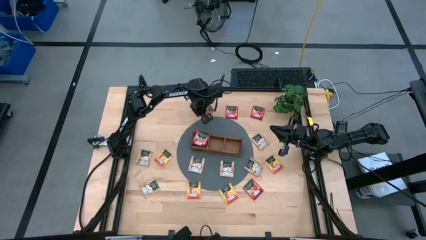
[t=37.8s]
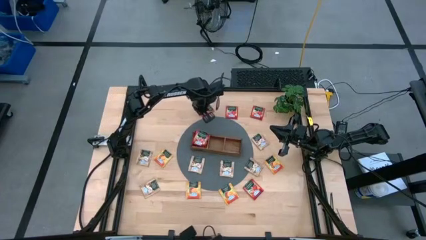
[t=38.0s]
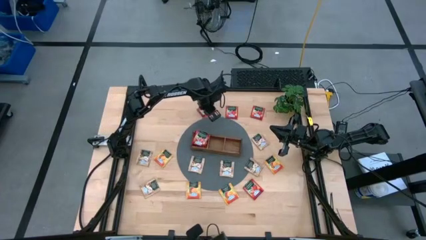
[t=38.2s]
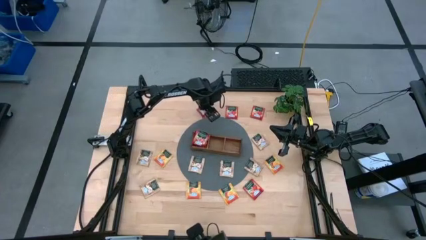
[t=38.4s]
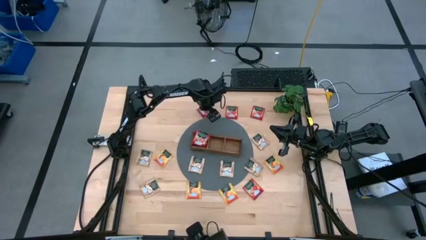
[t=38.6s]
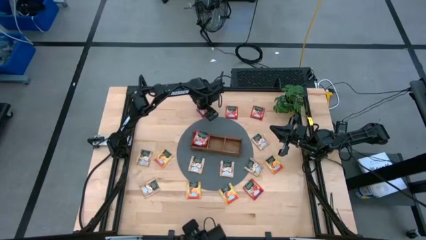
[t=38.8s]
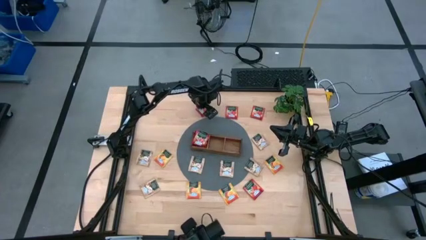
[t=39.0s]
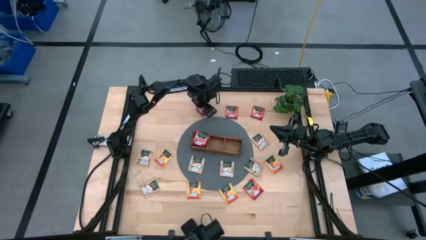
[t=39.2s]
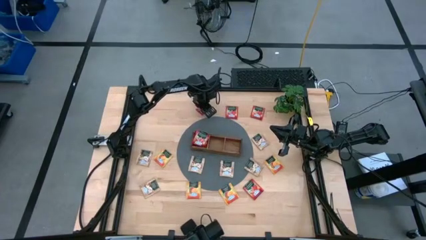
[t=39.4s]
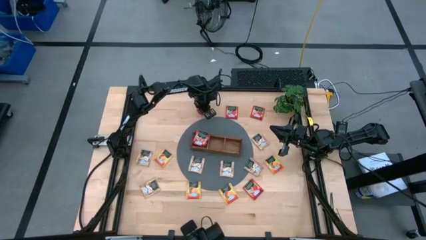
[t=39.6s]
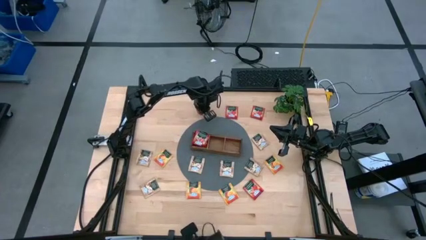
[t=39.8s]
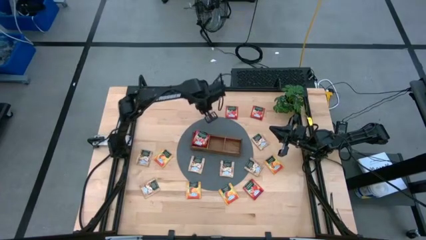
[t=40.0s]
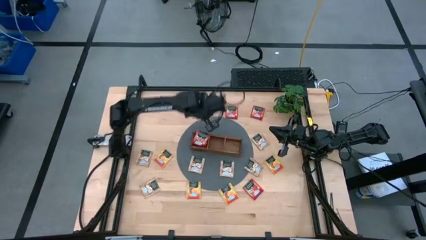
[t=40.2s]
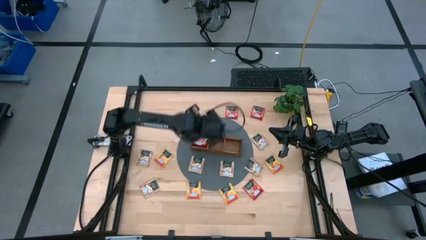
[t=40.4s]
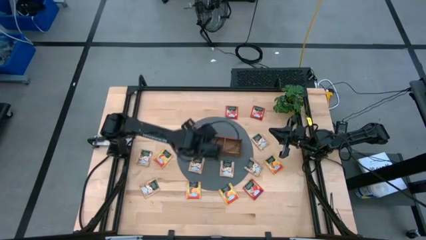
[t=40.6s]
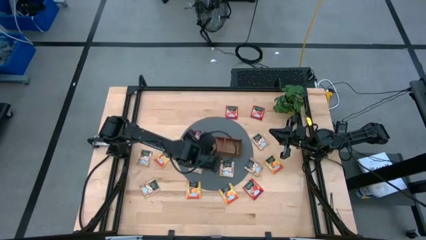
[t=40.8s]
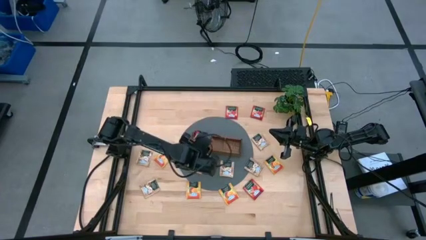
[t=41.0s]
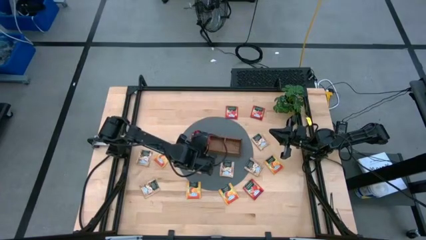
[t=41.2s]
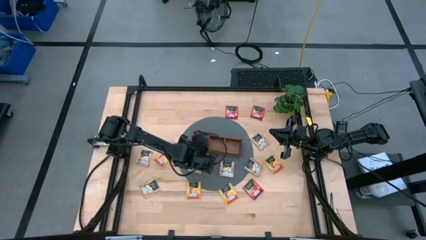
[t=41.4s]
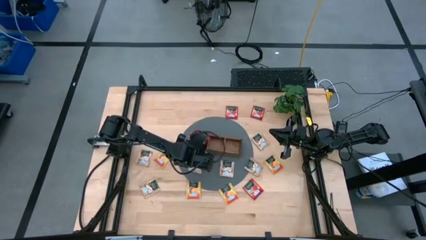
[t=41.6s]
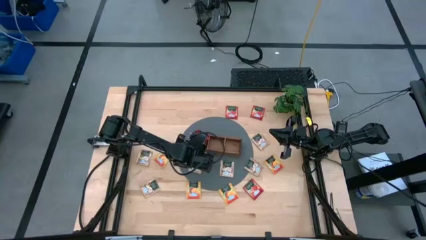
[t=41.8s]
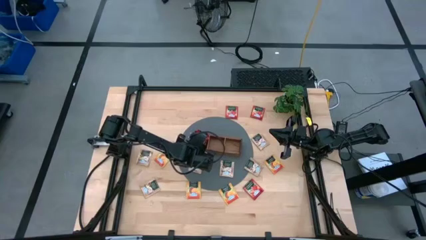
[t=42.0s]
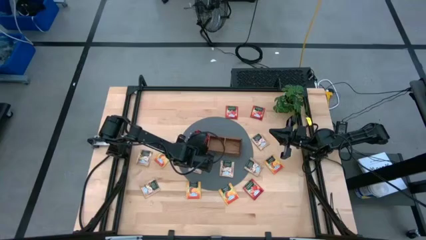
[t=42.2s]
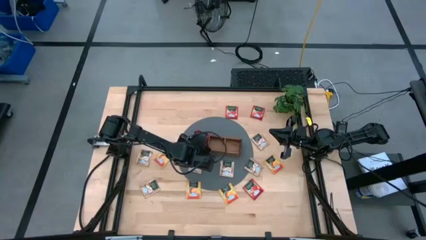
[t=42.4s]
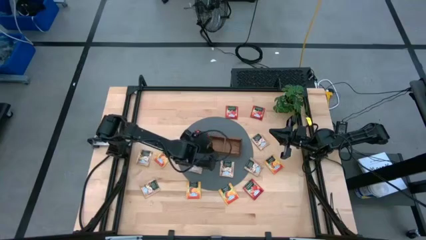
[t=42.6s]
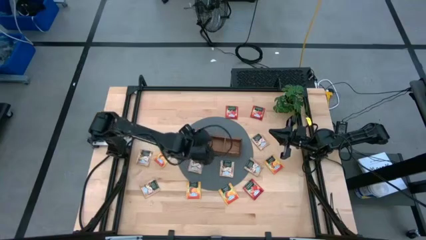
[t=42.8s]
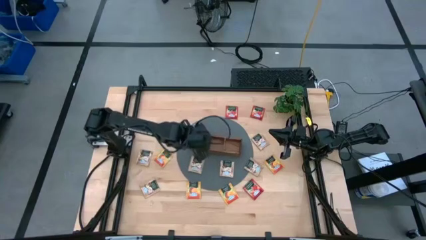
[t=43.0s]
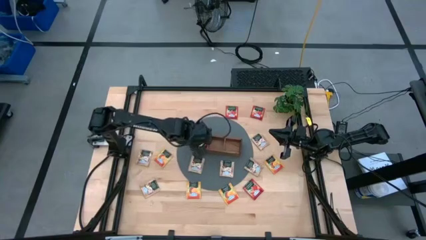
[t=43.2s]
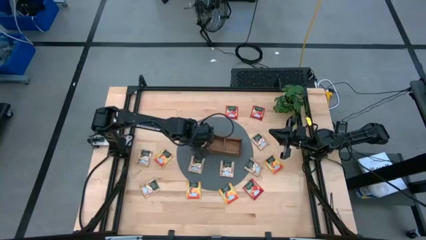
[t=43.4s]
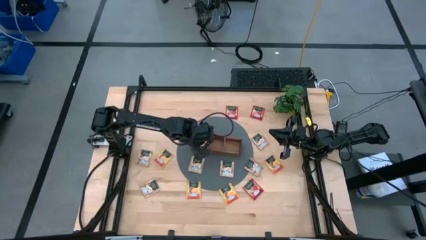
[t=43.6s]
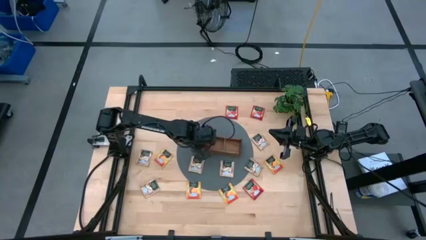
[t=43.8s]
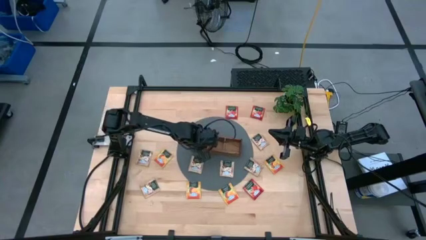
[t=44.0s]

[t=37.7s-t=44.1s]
Task: Pick & Place Tea
Put the red tea bag into the left section of the wooden organizer

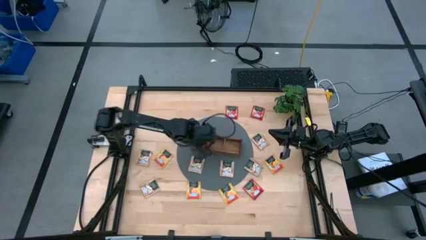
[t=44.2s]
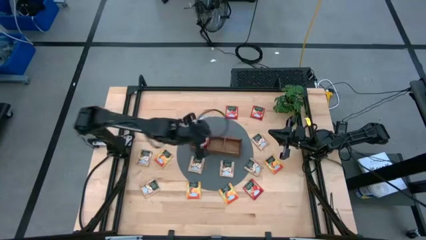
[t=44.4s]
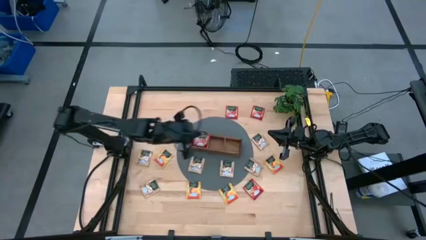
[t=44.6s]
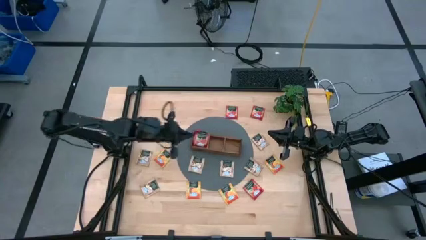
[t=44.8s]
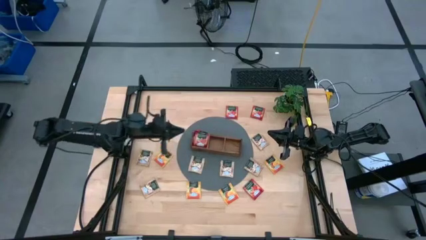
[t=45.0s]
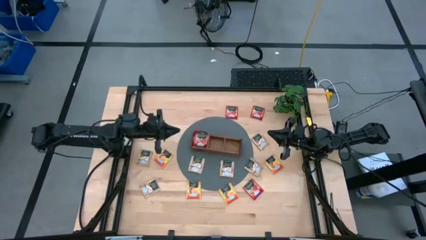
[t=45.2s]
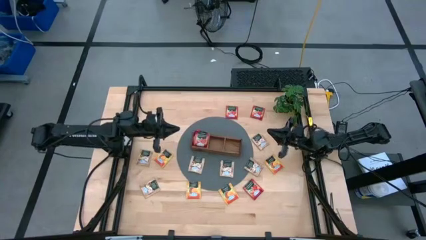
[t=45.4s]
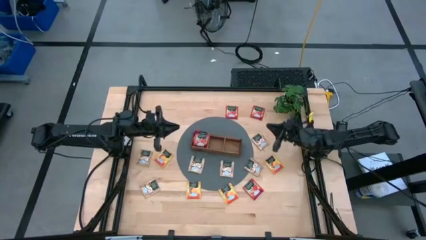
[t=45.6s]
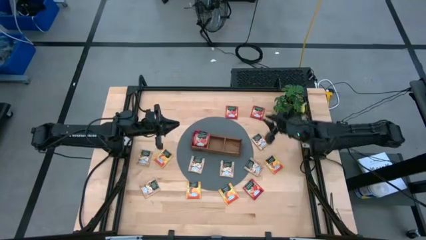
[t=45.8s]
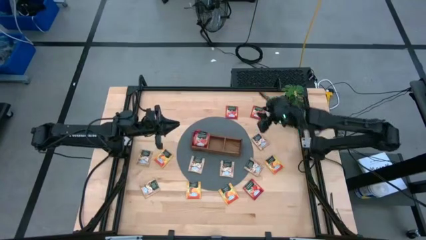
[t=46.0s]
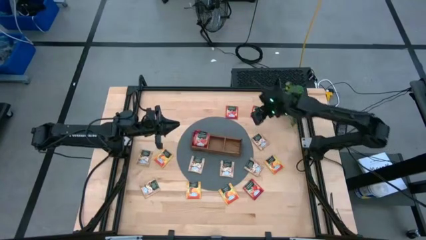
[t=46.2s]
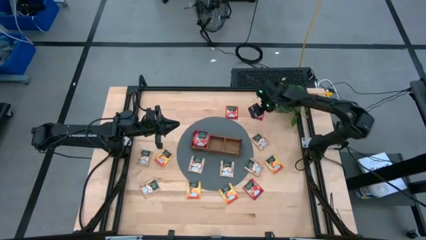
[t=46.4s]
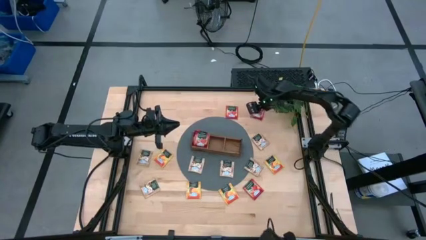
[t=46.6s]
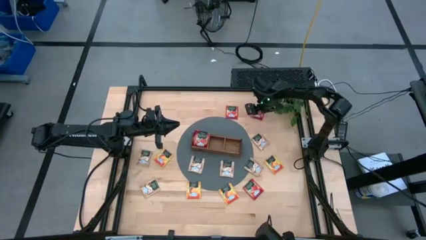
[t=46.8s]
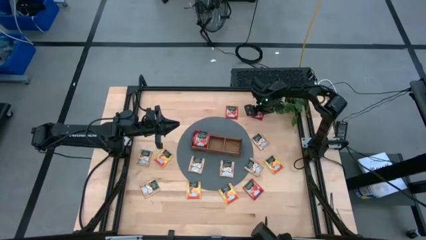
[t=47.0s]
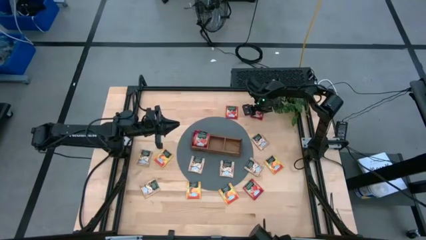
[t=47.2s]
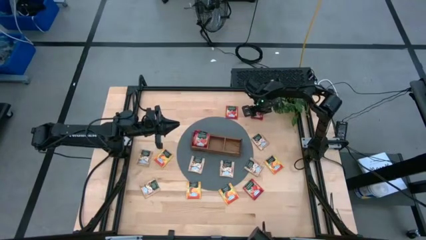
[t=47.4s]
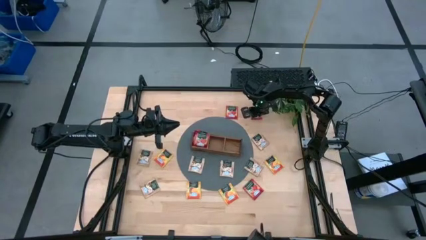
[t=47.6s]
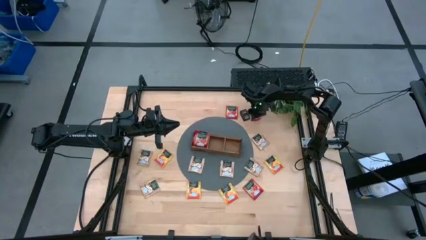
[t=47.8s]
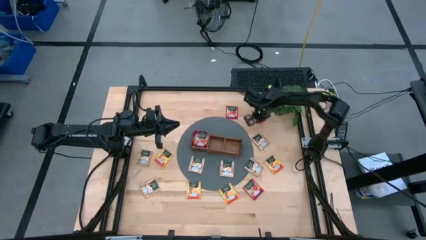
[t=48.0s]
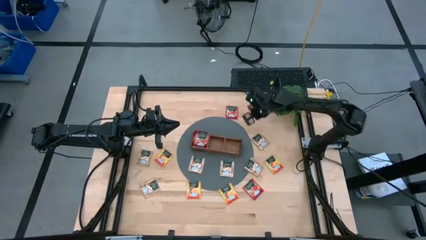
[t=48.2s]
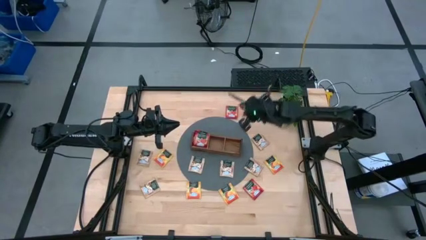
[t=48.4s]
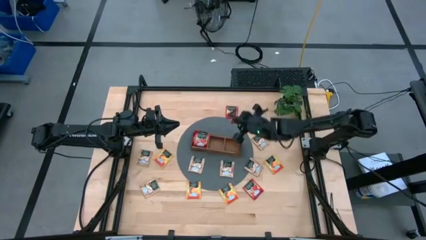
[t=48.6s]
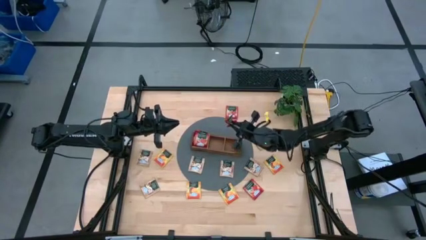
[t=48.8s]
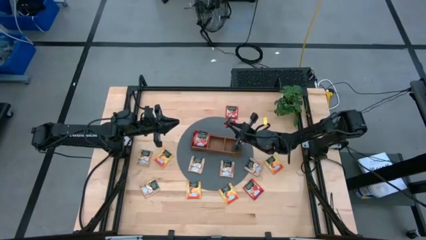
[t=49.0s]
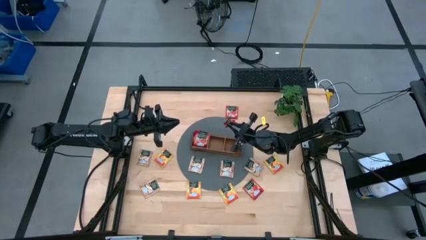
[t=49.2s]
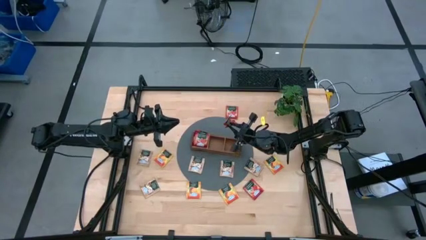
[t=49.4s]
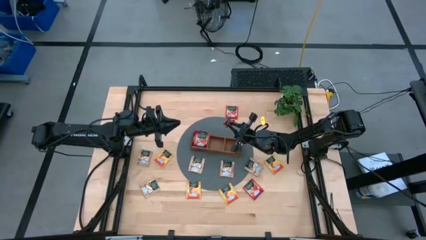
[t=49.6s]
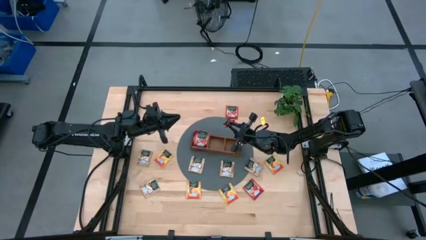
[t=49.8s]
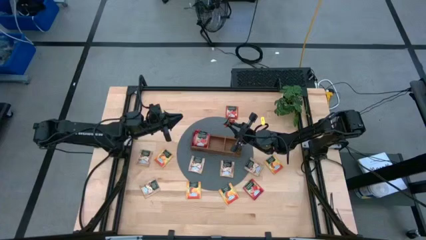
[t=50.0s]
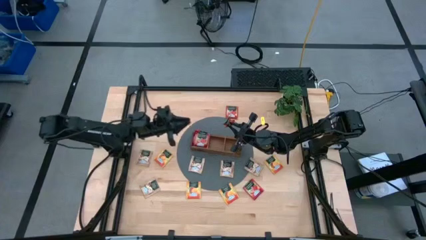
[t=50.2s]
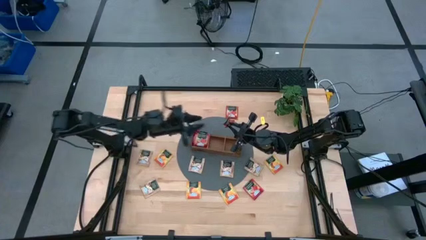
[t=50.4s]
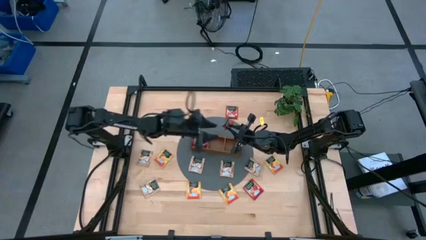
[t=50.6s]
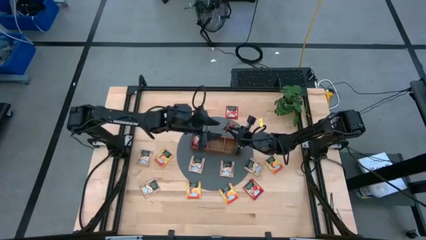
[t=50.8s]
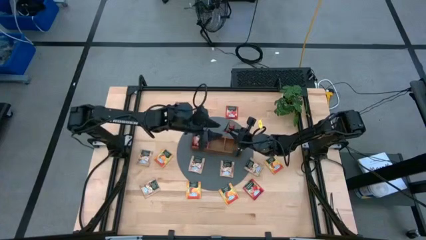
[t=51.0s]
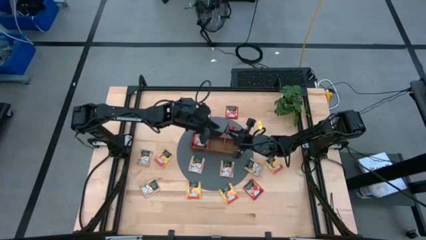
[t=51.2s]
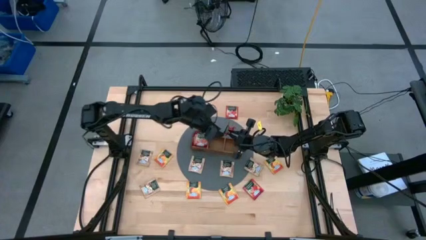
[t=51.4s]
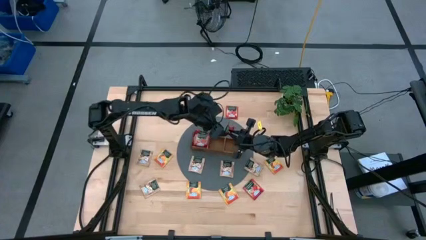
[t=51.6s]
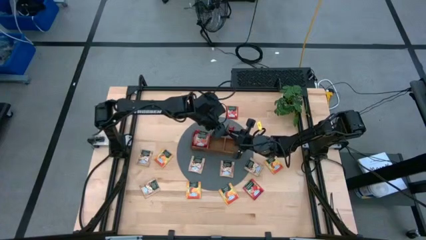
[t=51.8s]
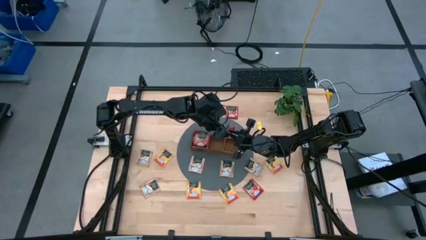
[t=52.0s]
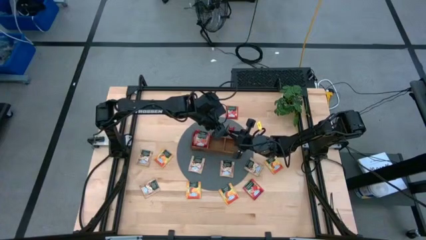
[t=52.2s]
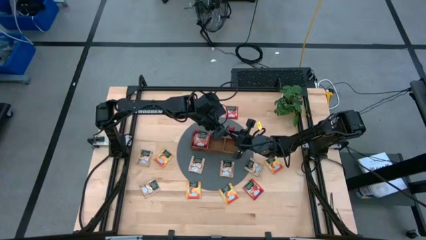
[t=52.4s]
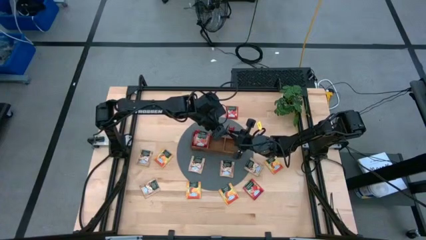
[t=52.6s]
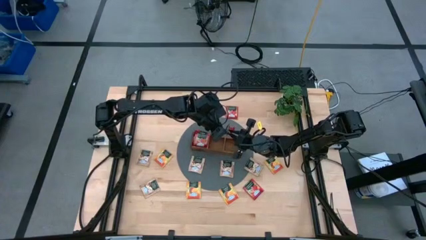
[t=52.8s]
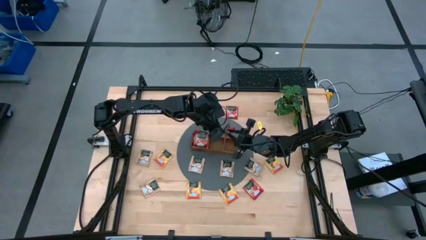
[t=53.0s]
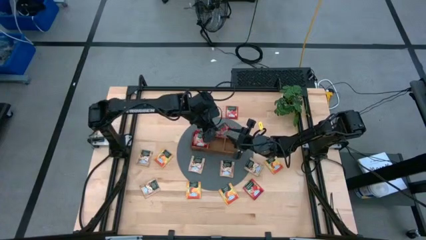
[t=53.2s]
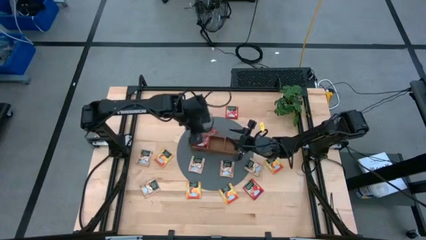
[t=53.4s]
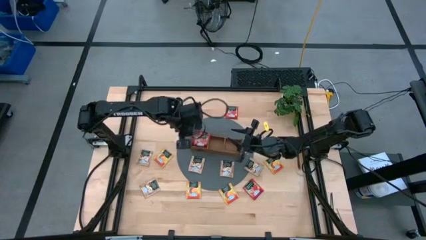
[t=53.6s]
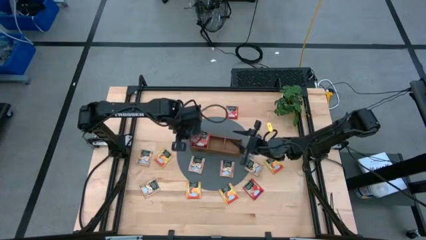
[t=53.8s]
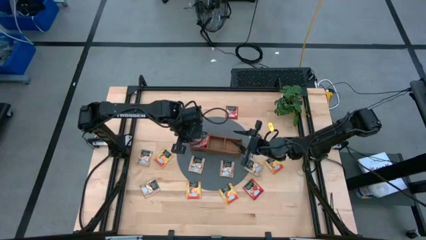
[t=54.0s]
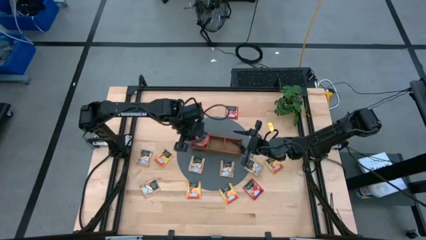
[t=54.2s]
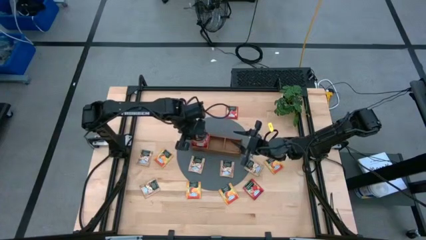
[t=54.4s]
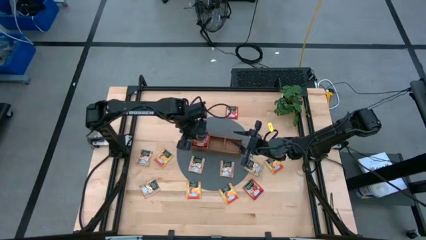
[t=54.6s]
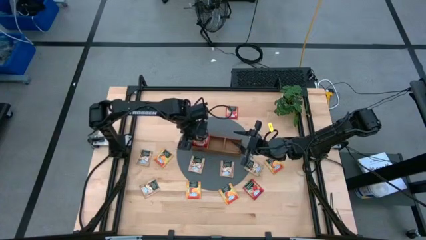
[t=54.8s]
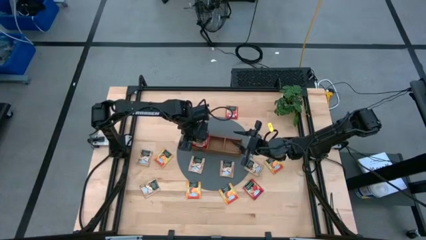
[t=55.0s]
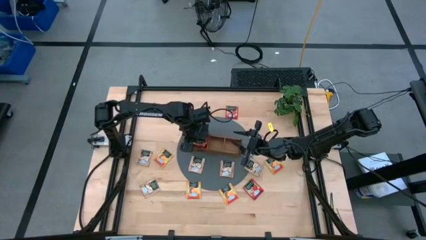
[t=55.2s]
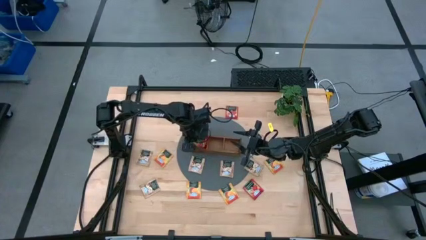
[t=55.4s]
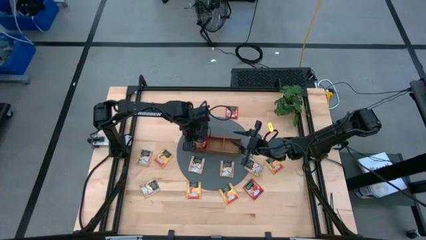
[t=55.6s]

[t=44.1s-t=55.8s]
Put the red tea bag into the left section of the wooden organizer
